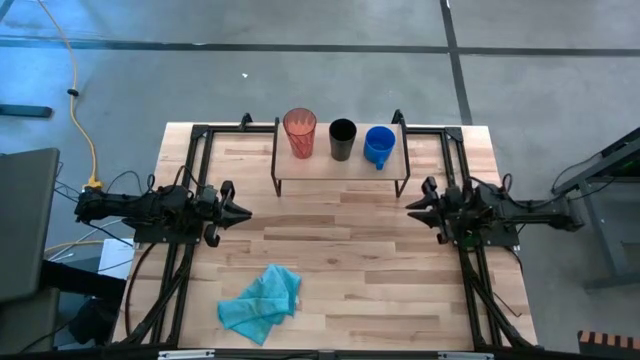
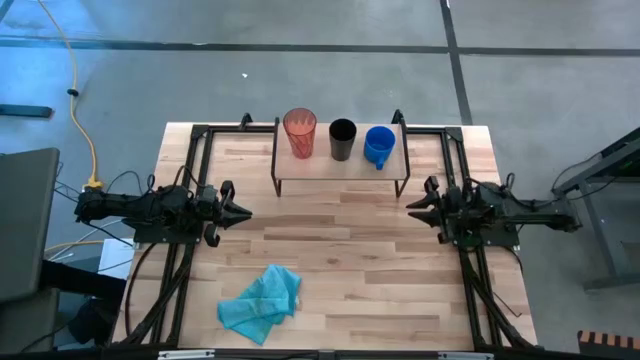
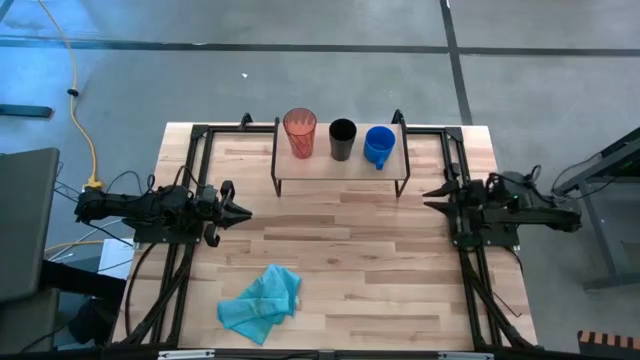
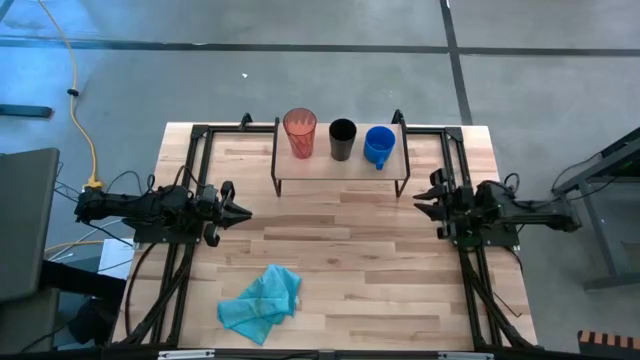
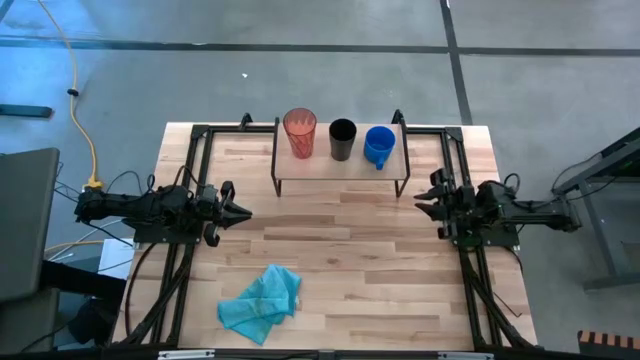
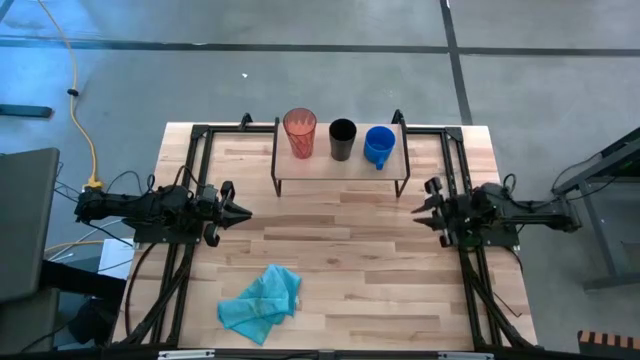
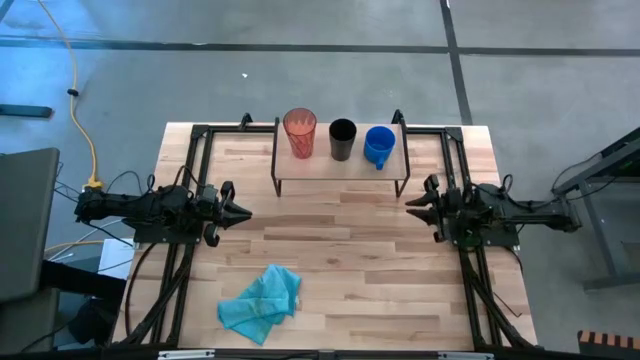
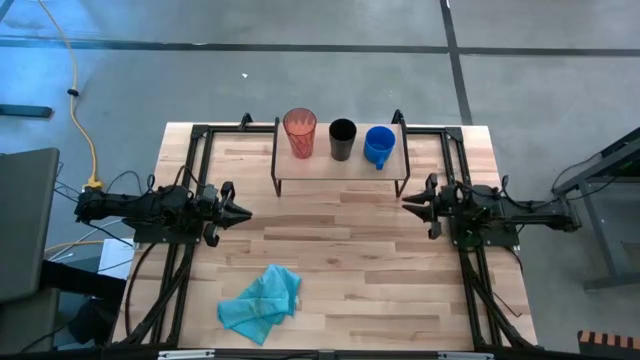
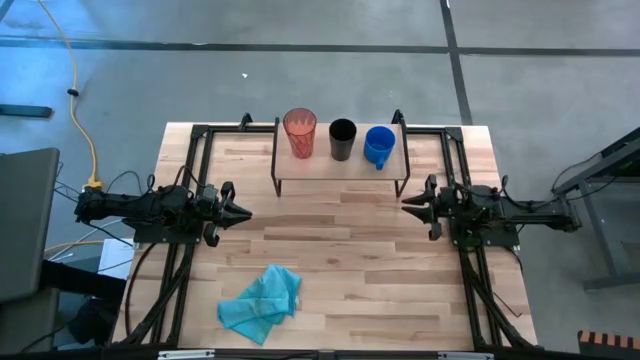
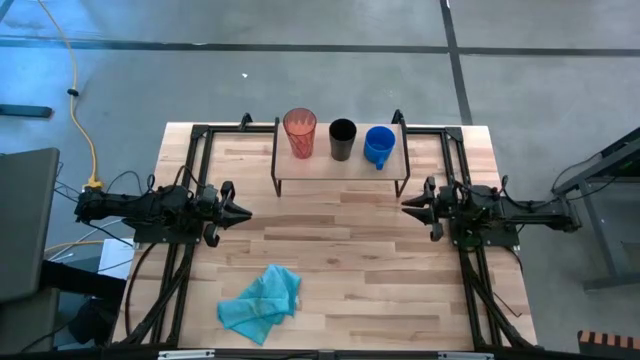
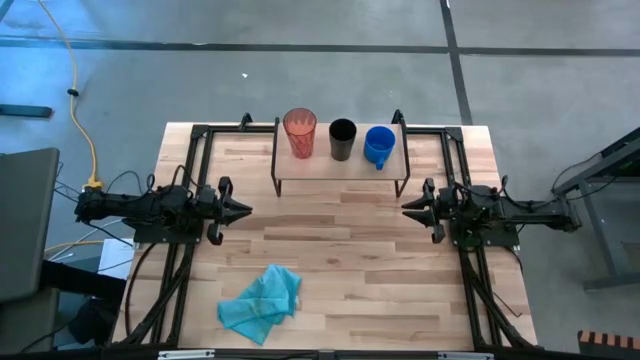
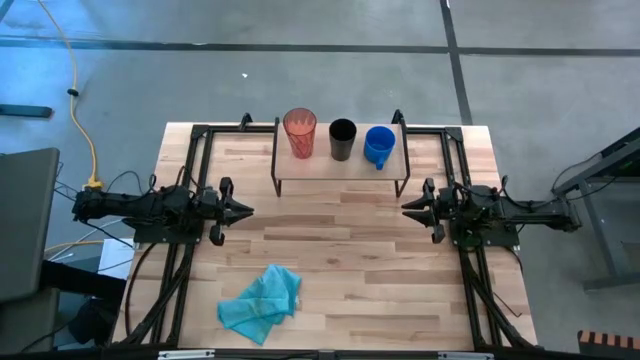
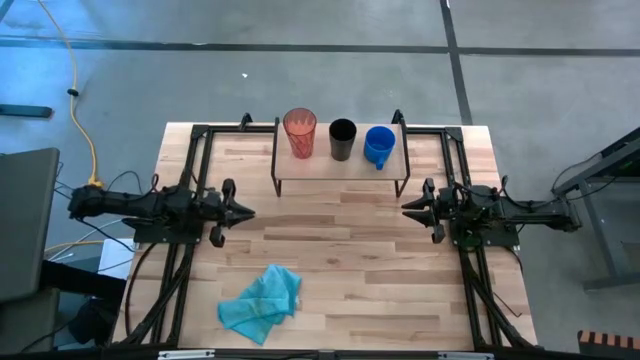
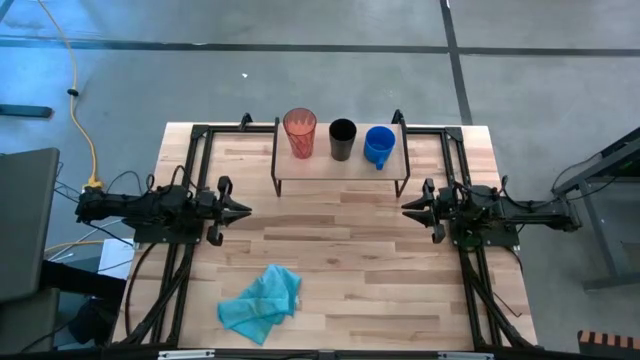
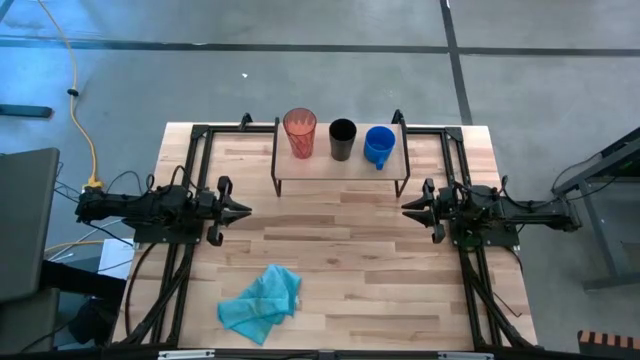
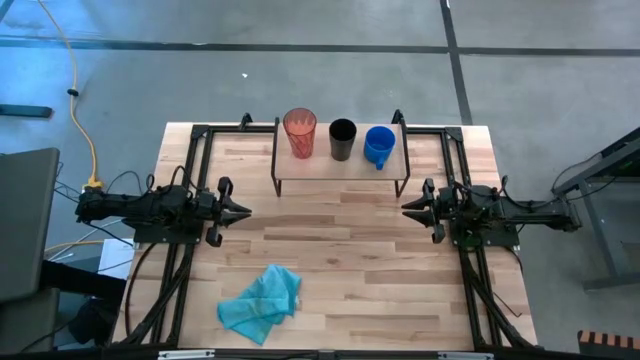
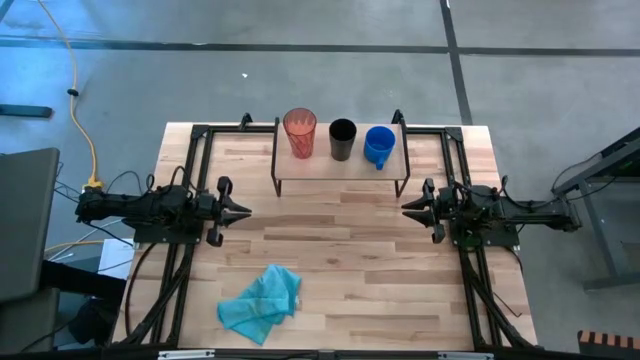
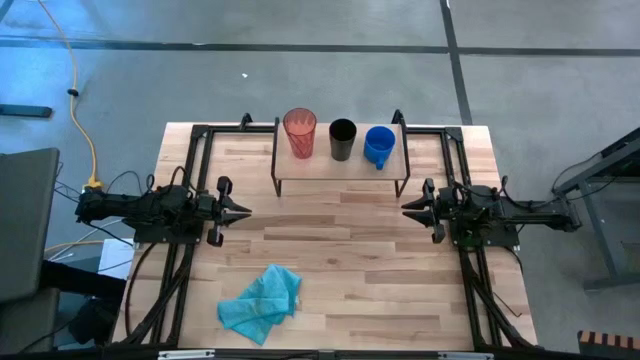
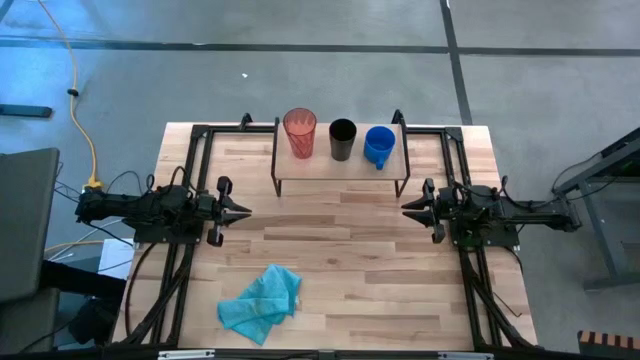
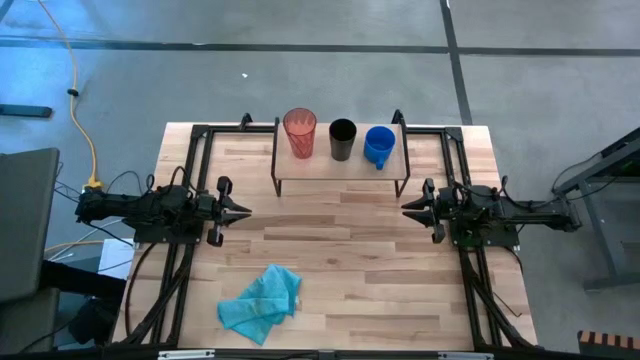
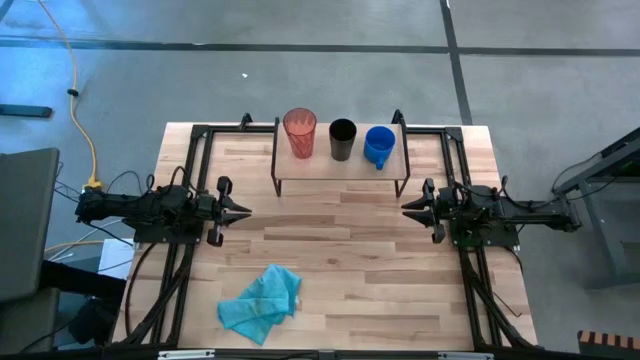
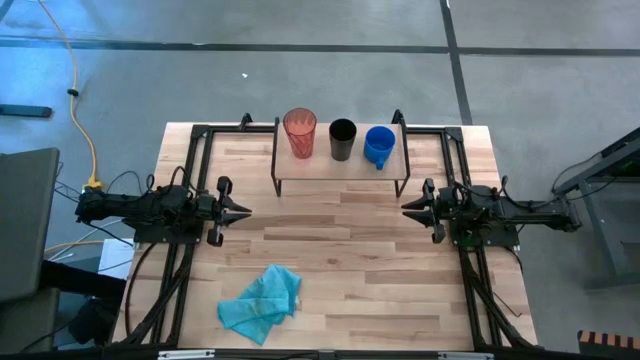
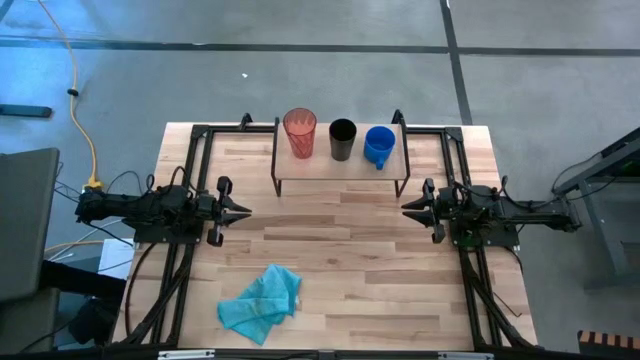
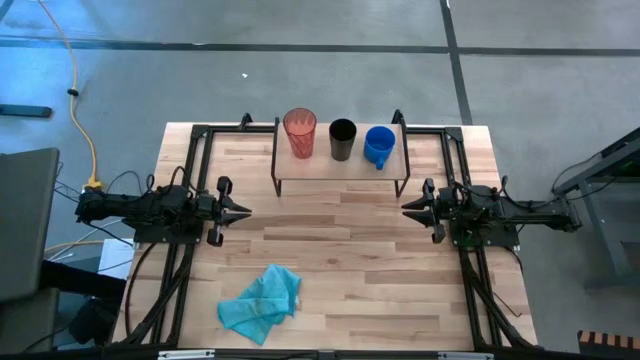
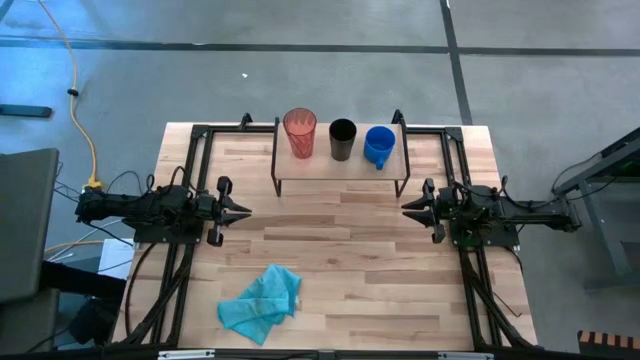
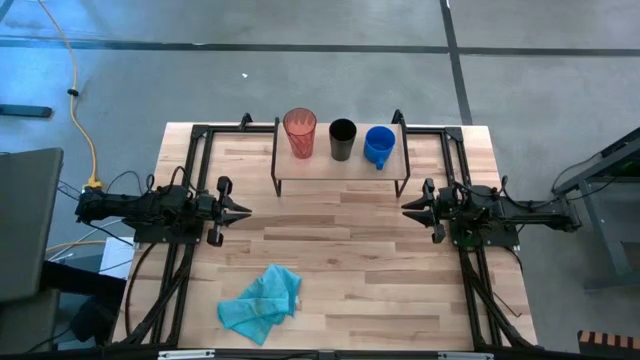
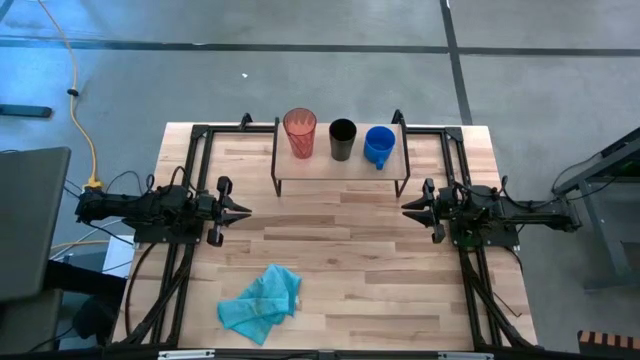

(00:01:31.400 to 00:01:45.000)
Task: Stack small to large cups/mugs on shelf
Return to Home Position

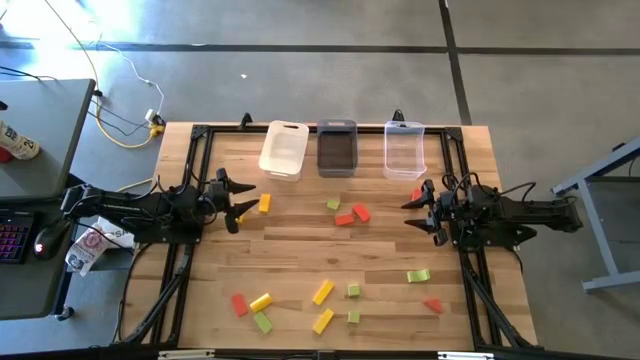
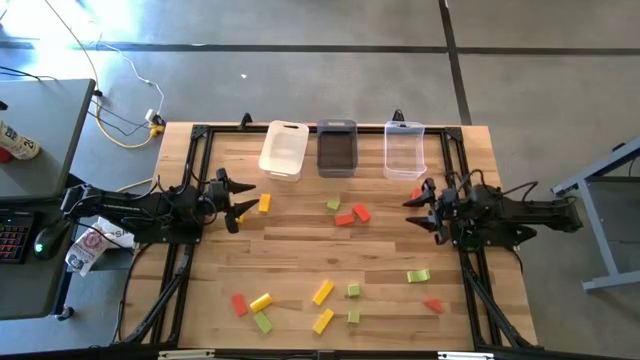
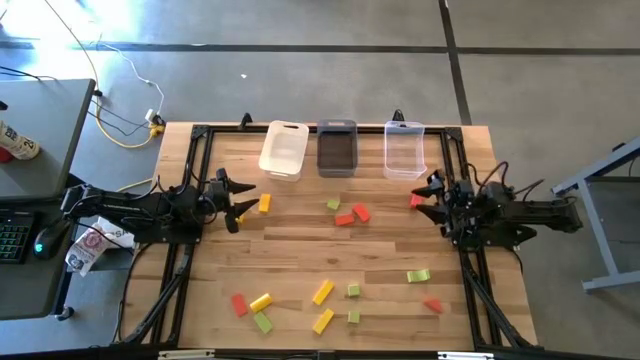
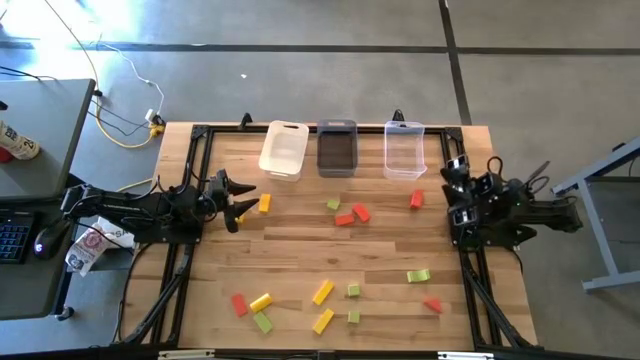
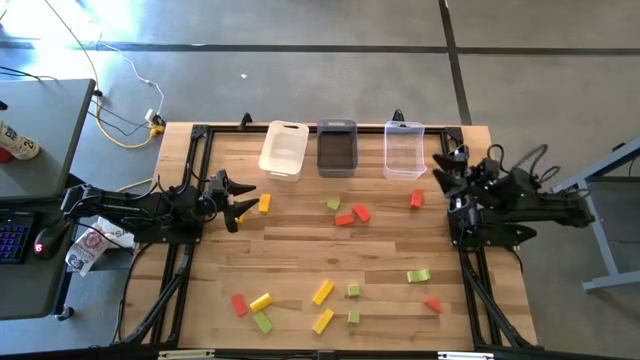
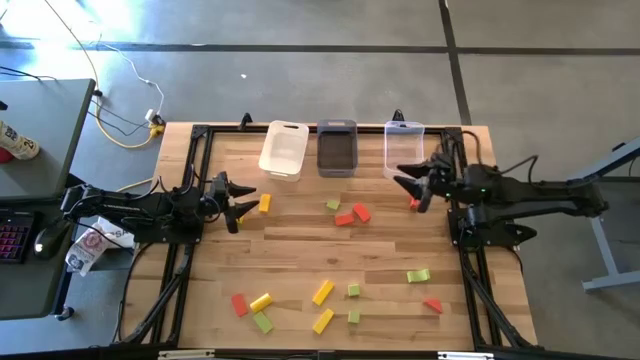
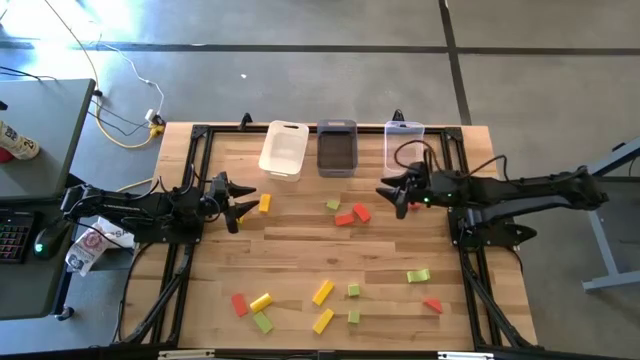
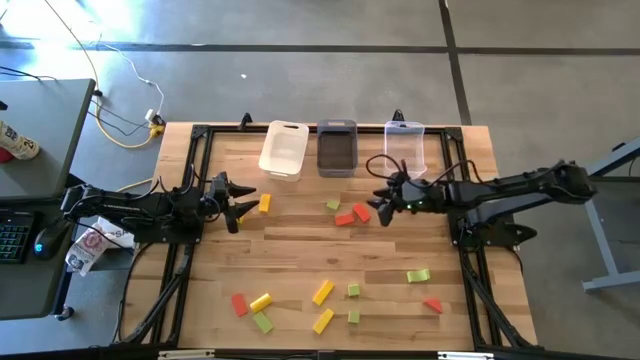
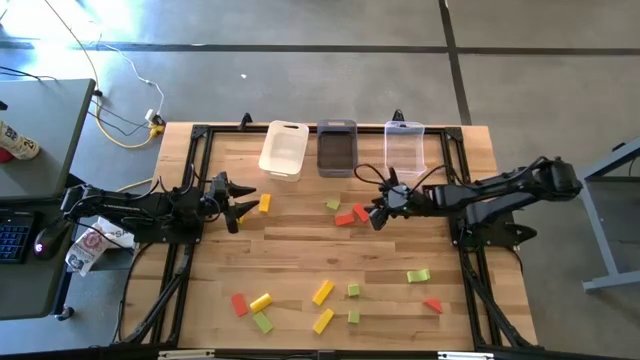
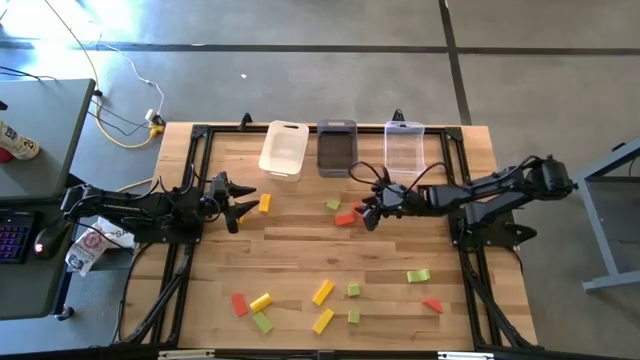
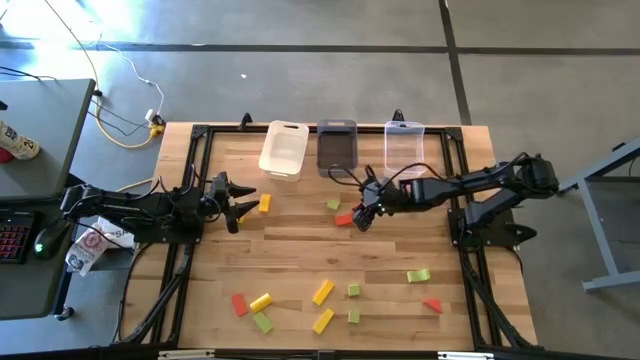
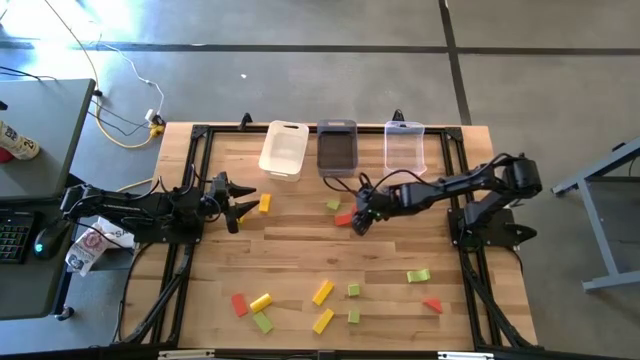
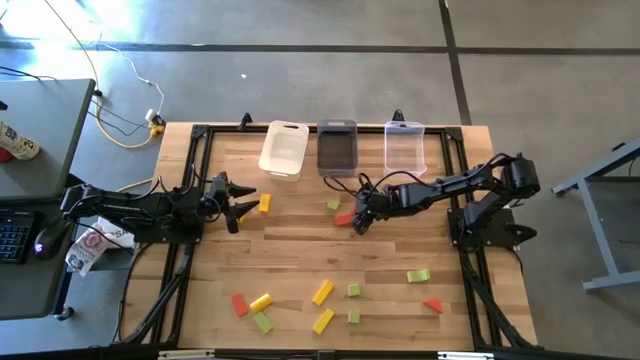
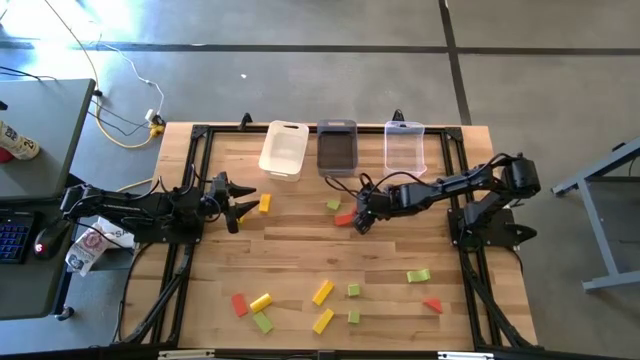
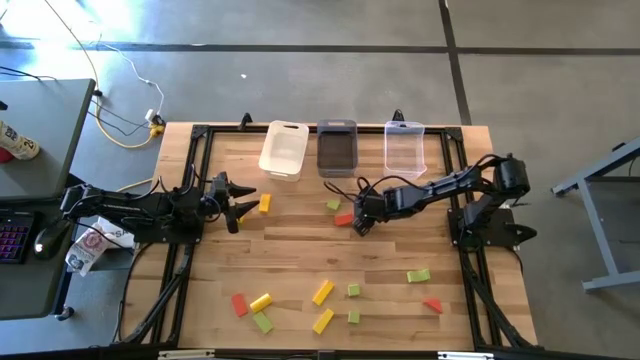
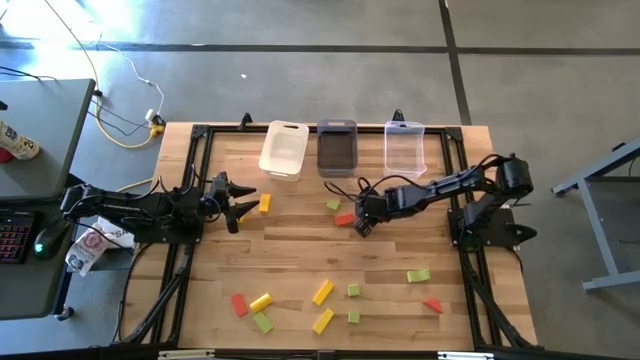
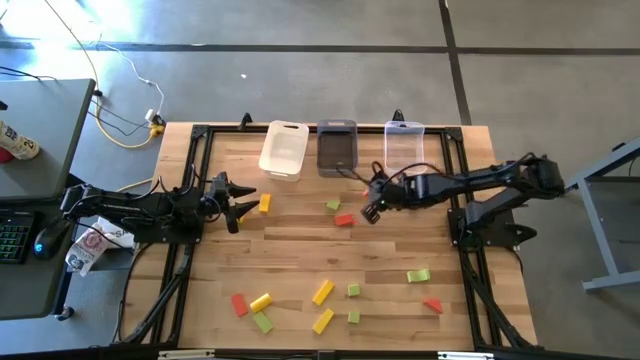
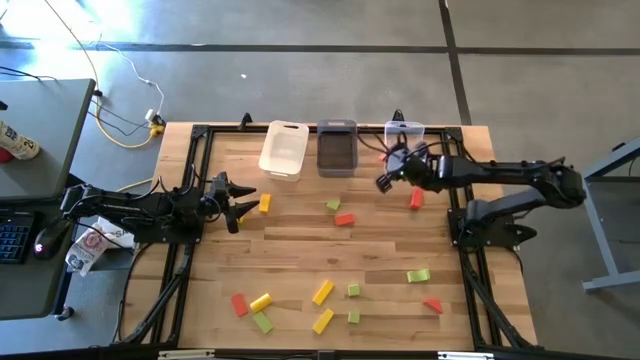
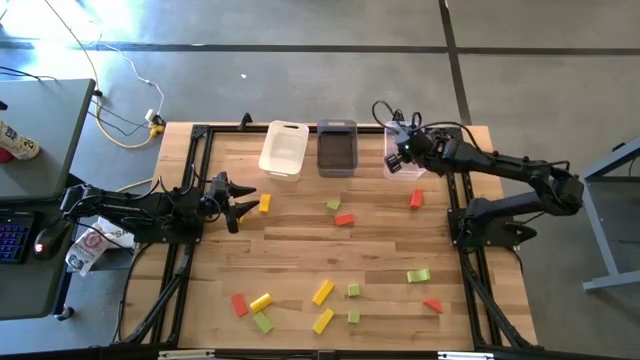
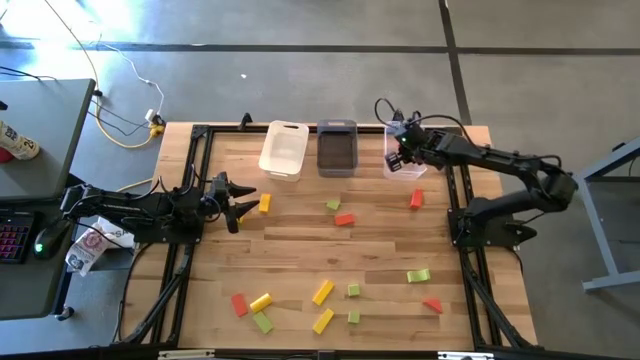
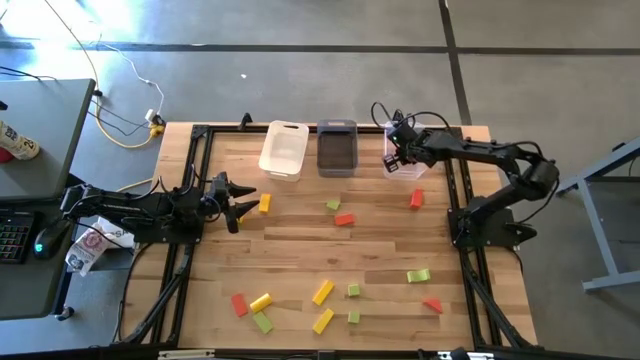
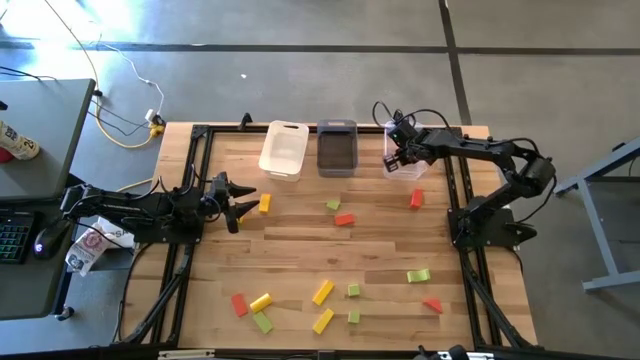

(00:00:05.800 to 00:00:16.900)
Task: Sort & place blocks by color
Put the orange block into the transparent bin
